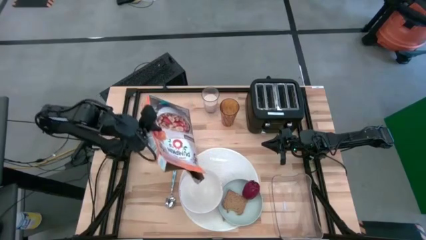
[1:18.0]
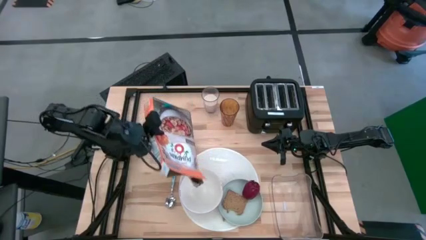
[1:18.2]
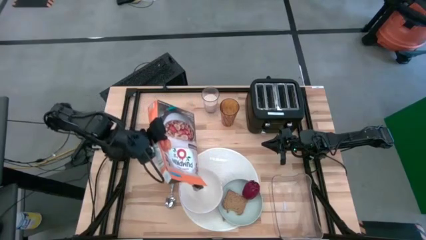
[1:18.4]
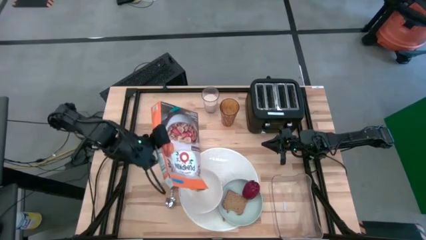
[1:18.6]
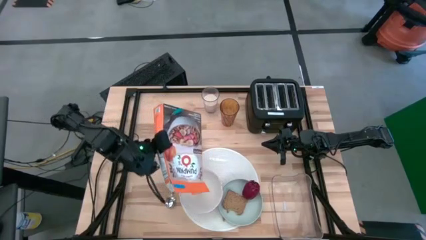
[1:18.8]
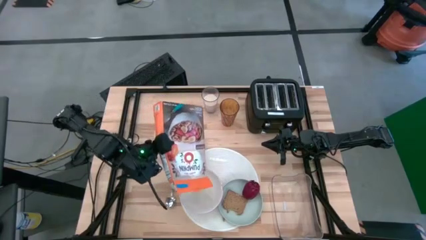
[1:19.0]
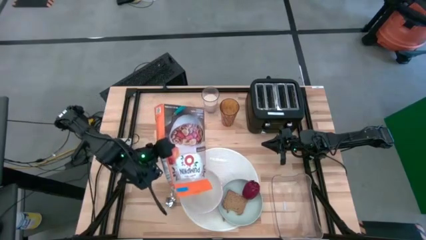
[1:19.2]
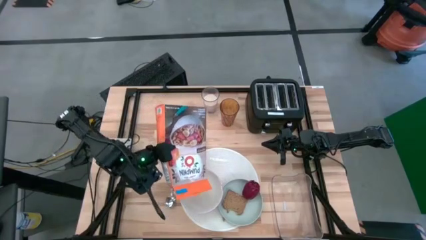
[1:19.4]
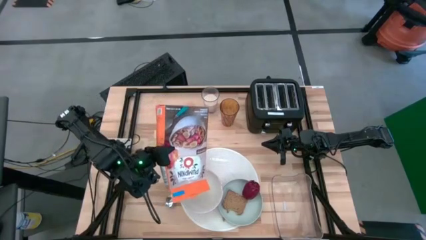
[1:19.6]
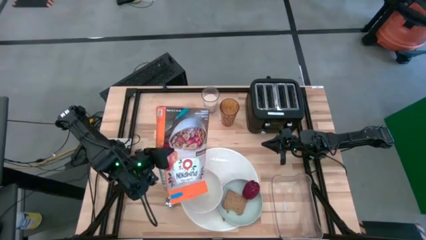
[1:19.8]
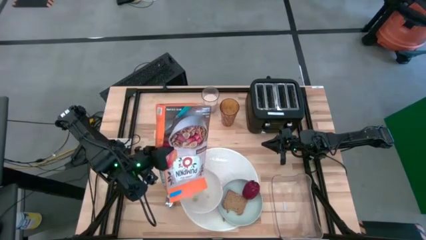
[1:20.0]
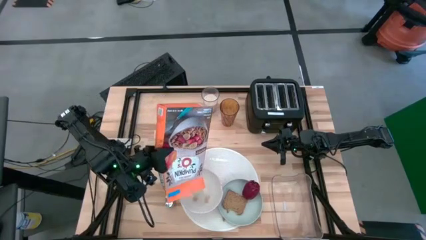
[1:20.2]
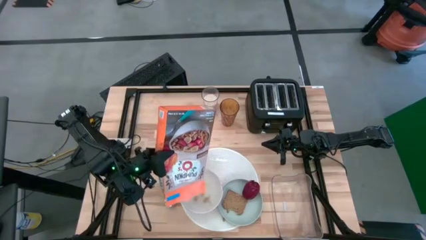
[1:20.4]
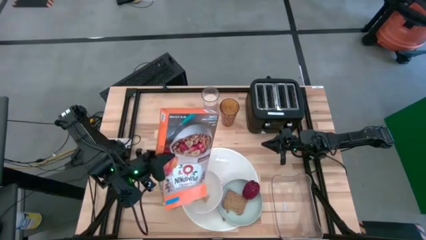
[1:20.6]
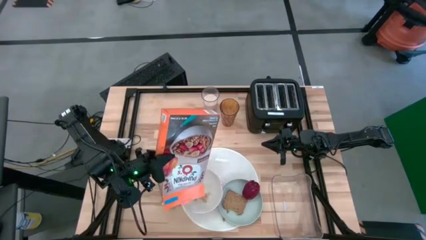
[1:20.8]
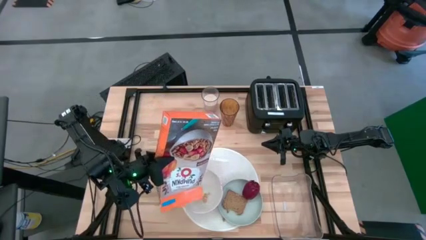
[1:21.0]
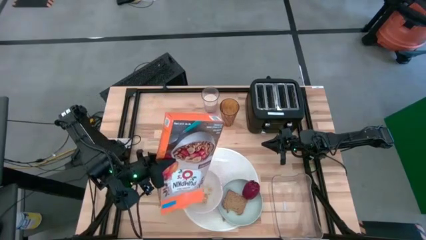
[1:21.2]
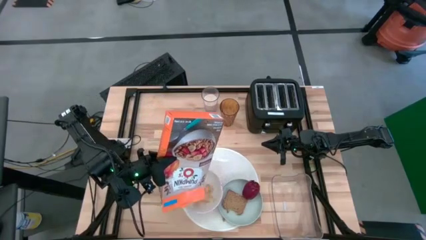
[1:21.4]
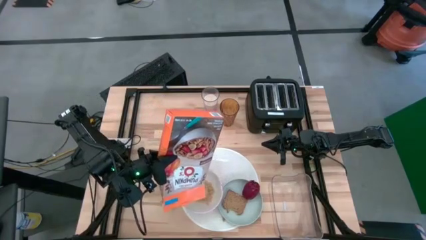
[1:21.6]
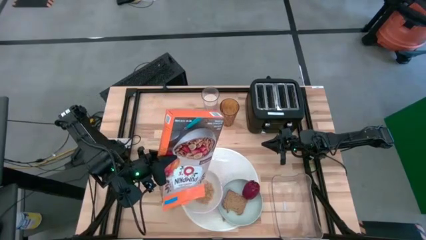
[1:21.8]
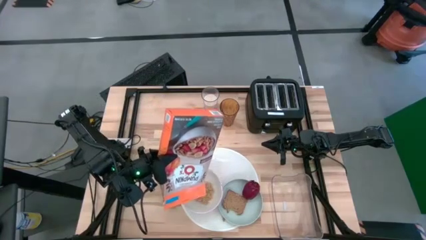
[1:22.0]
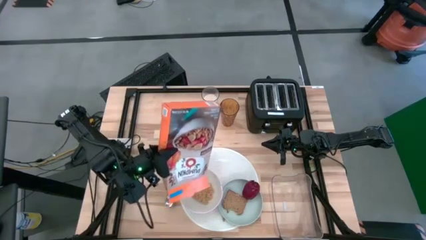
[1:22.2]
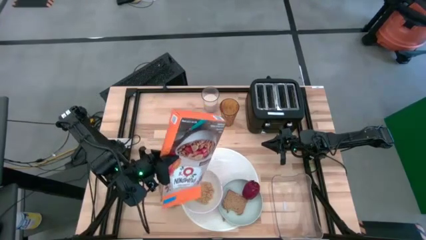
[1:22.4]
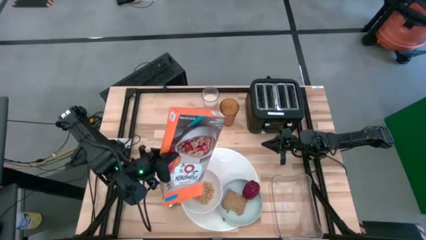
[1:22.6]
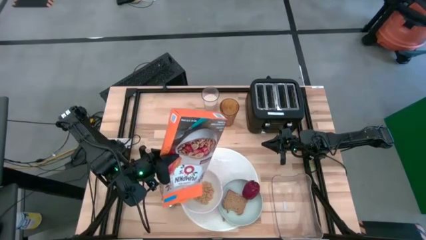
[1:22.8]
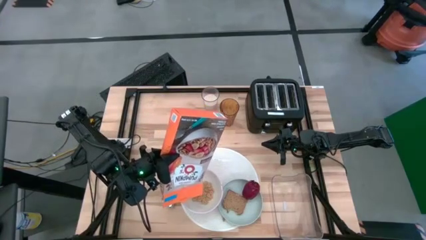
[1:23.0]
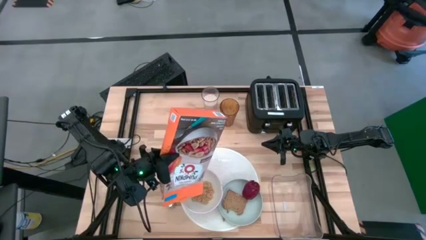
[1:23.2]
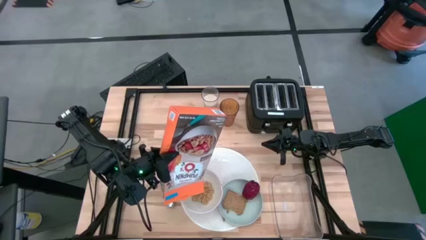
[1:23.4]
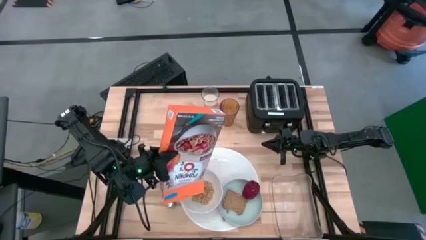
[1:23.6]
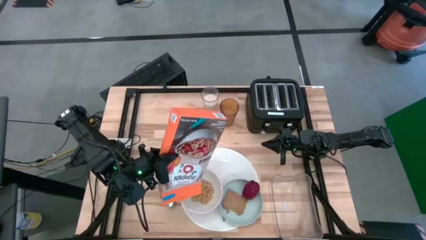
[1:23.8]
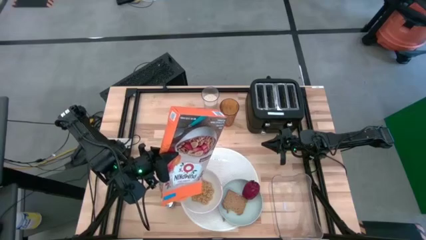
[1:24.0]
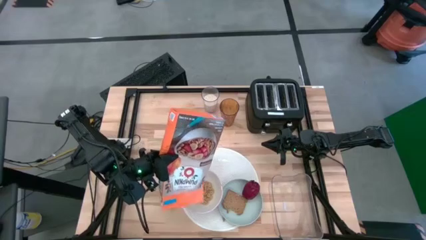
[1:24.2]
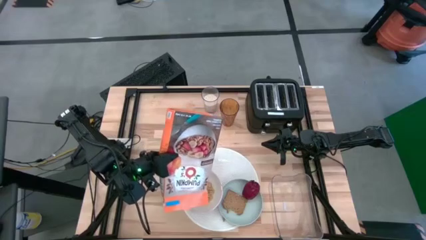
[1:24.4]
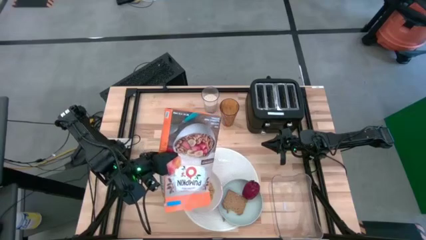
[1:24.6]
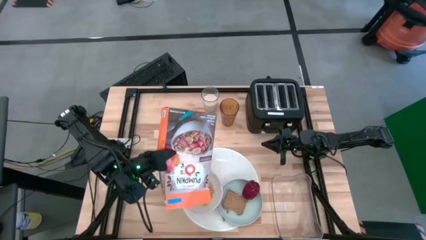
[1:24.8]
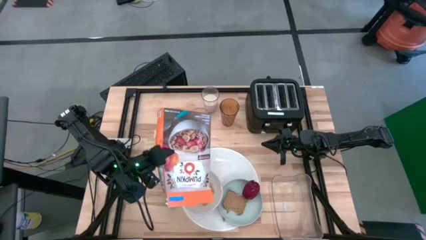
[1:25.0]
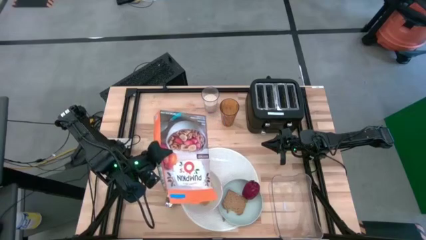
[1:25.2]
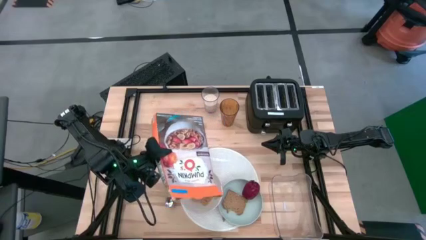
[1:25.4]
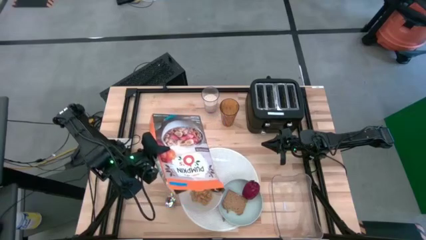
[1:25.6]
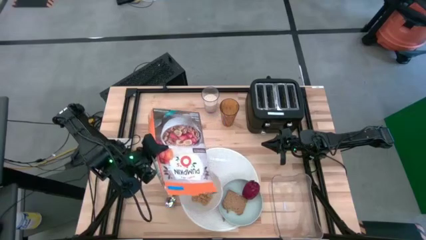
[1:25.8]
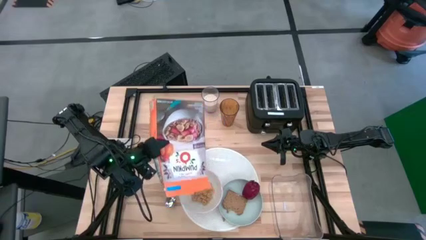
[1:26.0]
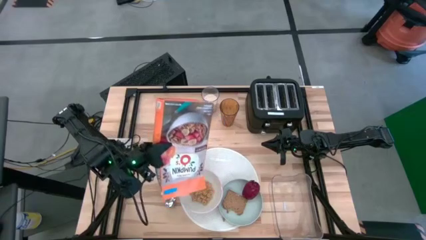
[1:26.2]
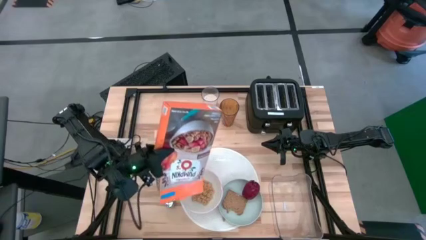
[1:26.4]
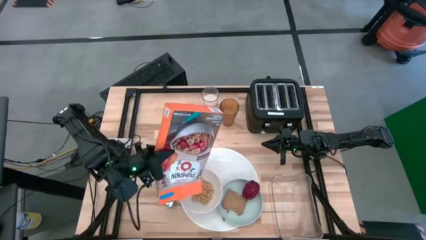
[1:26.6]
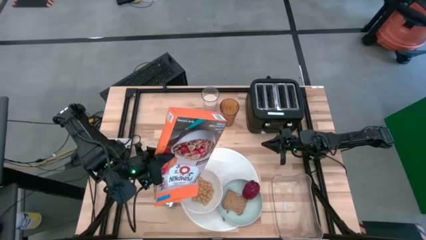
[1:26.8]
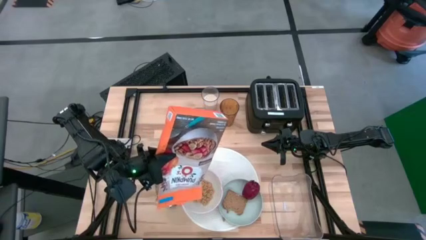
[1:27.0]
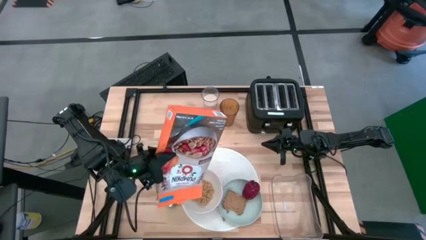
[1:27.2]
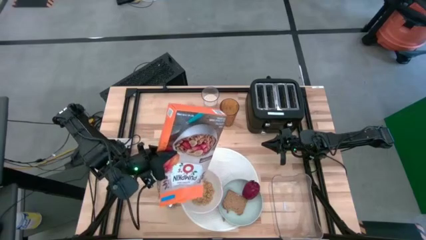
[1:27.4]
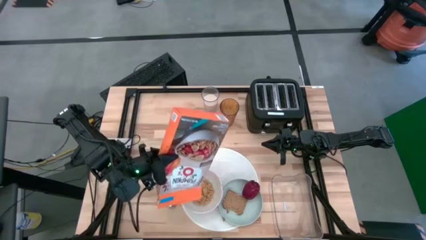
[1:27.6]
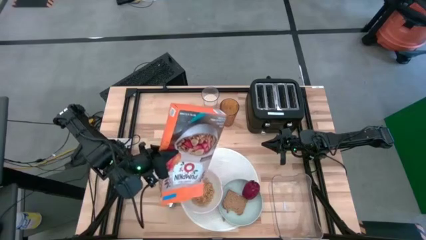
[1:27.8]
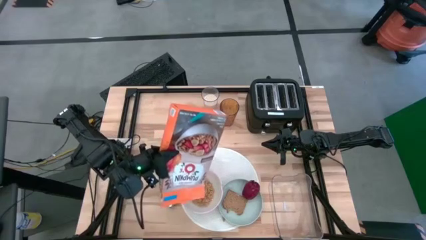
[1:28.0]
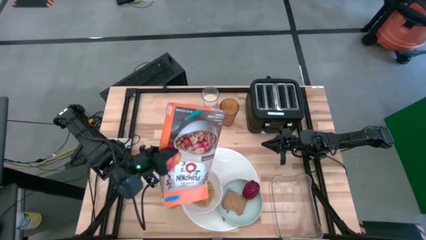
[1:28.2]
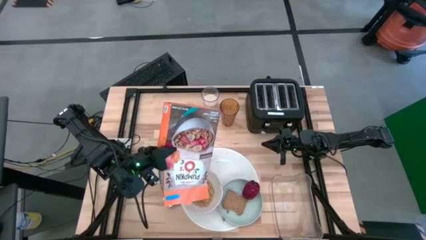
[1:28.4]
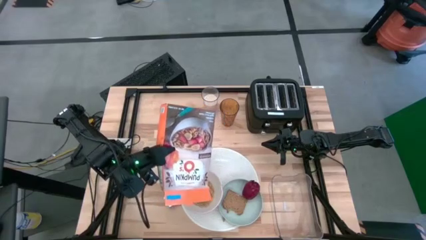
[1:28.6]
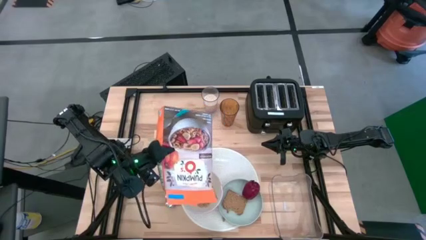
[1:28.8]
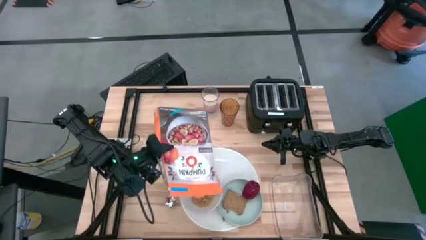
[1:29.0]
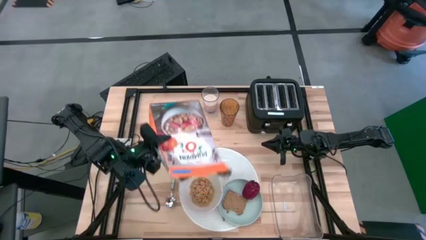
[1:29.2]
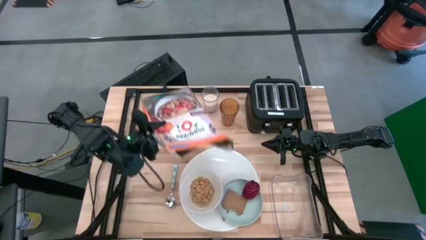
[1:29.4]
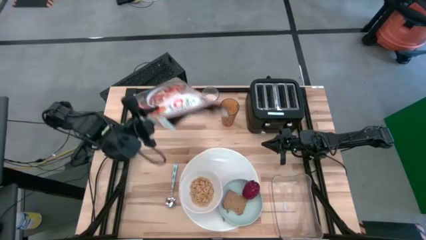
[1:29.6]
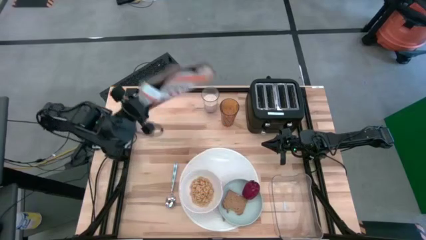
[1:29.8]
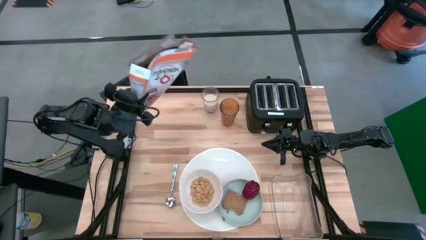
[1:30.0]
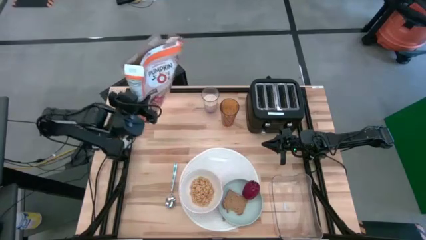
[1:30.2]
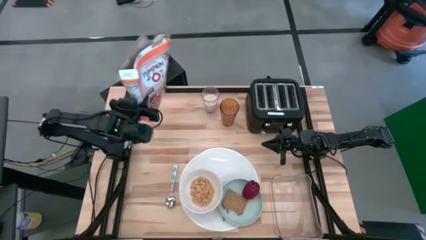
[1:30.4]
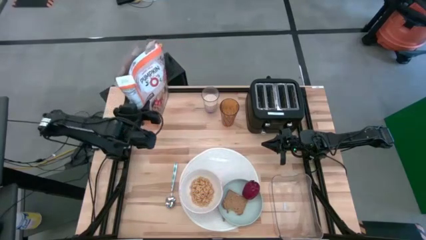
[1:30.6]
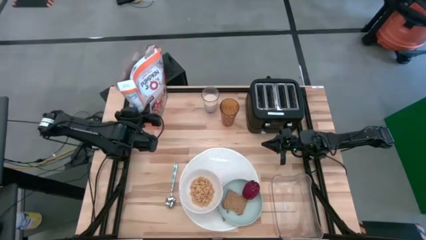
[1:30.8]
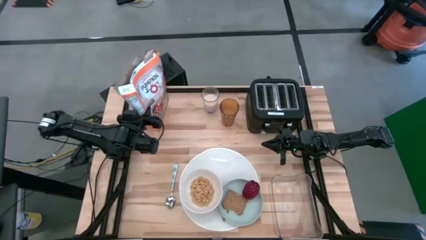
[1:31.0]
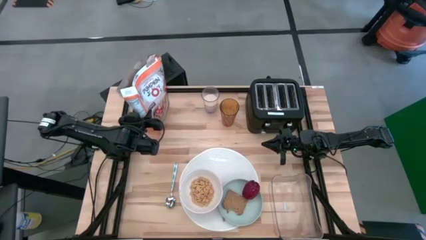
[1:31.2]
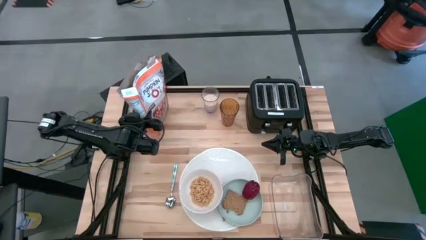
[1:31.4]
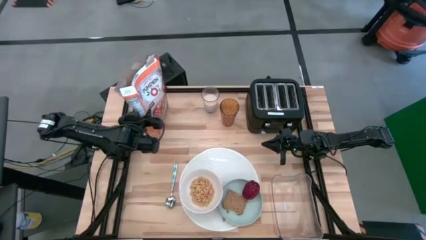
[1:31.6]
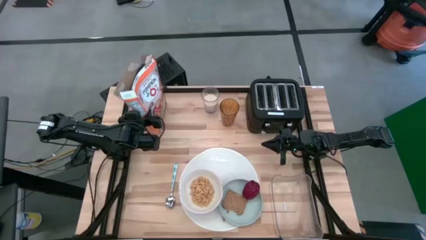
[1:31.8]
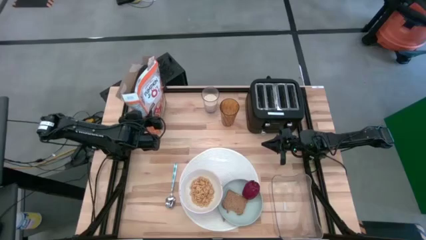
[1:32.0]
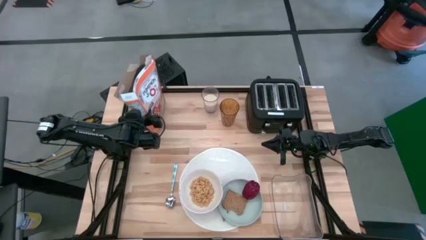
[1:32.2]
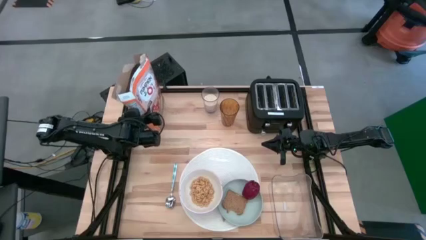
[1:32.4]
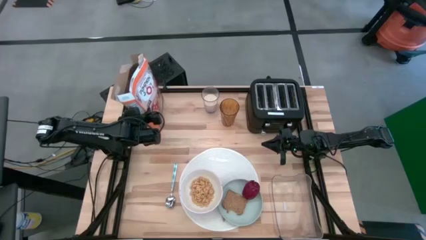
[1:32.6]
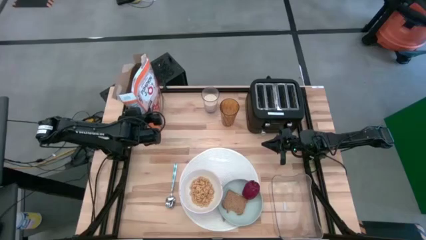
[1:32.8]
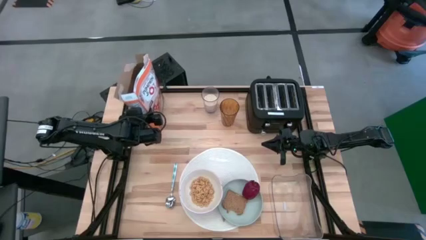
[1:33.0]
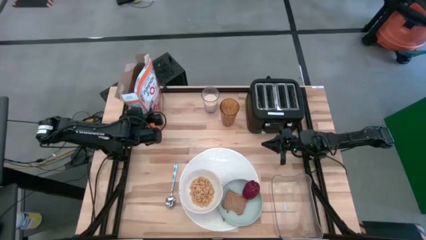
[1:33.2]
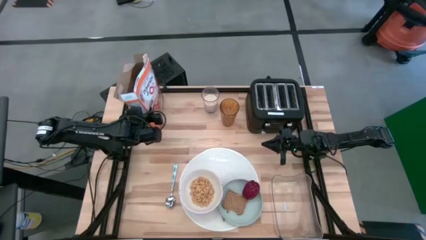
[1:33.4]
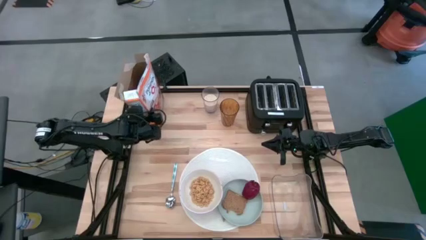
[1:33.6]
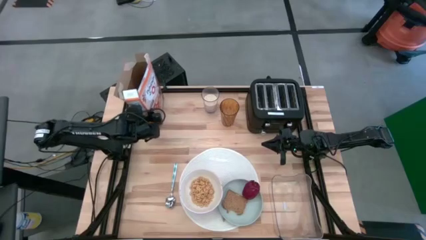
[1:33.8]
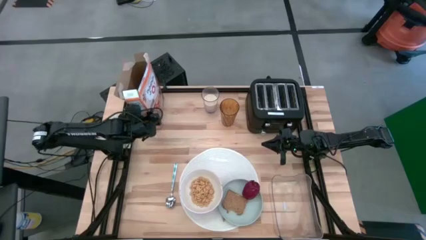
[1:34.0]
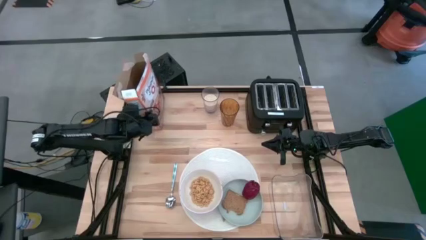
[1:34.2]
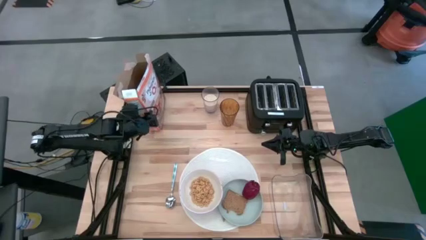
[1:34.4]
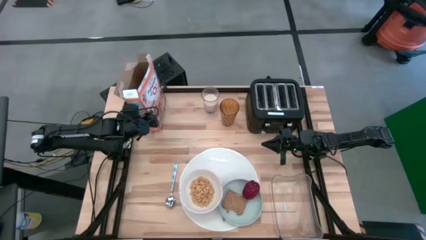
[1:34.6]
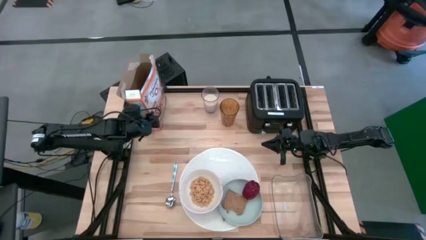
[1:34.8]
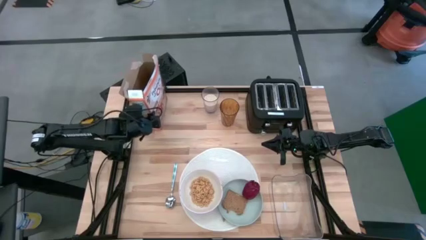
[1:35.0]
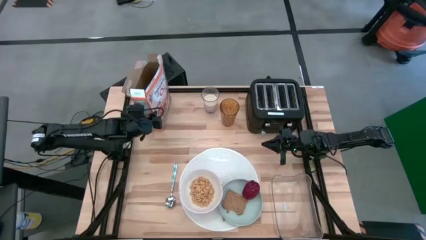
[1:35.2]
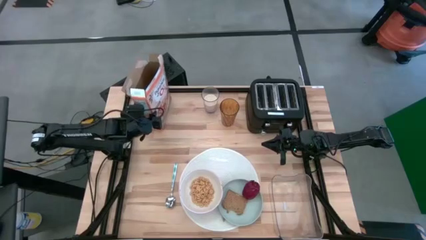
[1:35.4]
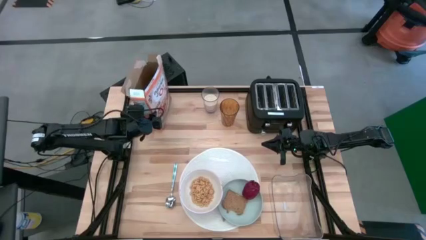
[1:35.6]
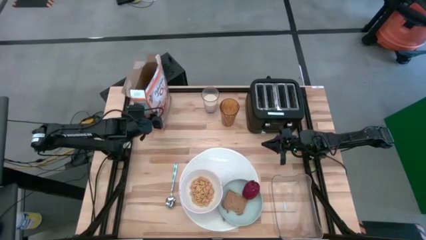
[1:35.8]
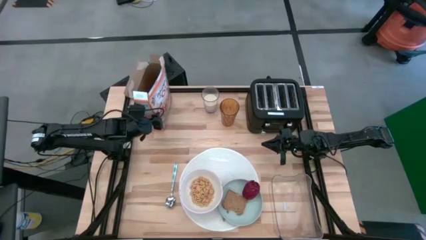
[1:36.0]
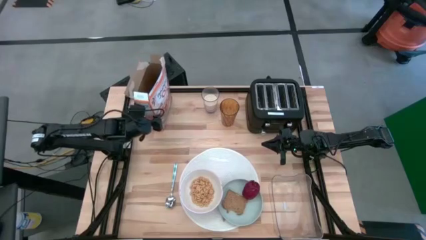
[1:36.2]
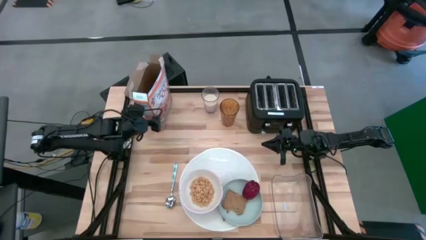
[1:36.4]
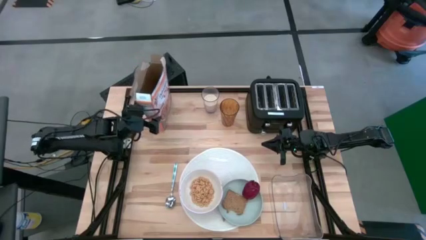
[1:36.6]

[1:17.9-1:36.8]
Task: Arrange a breakfast setting
Pour the cereal into the white bowl
